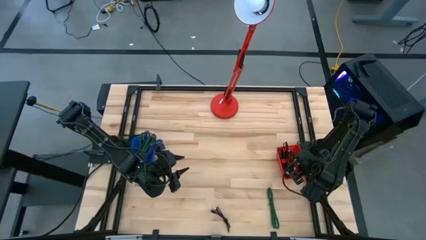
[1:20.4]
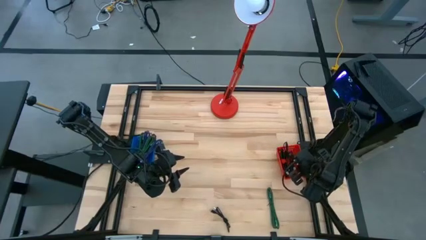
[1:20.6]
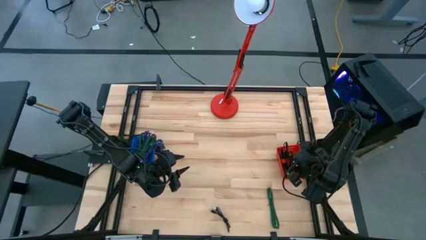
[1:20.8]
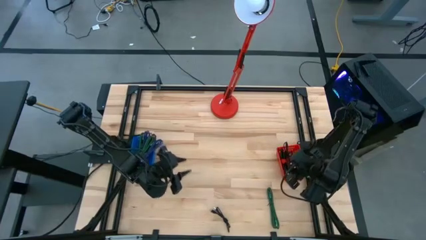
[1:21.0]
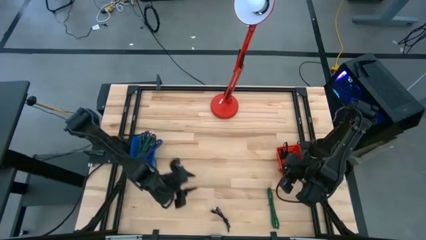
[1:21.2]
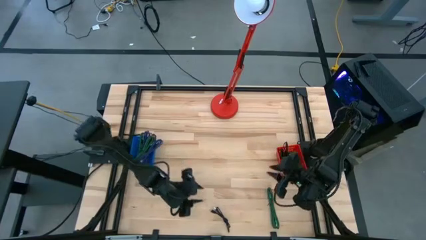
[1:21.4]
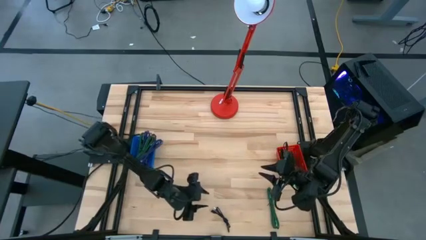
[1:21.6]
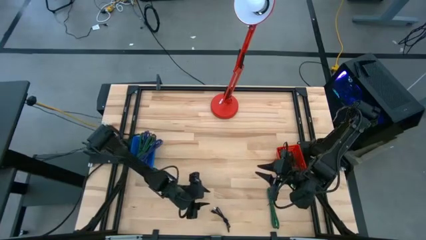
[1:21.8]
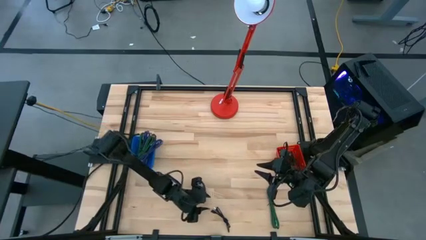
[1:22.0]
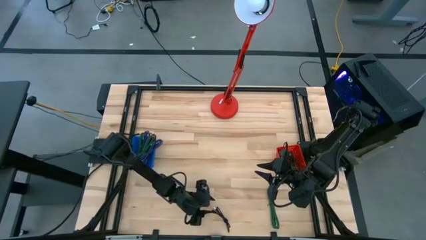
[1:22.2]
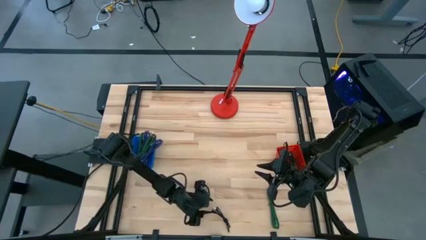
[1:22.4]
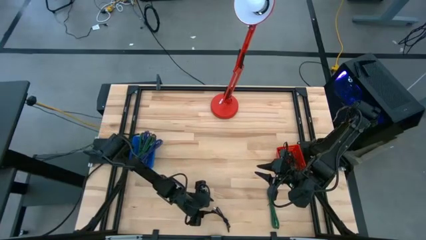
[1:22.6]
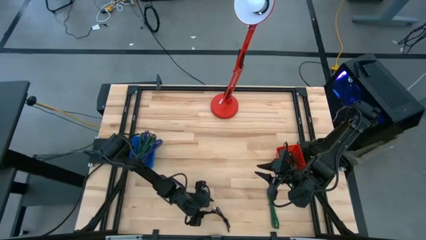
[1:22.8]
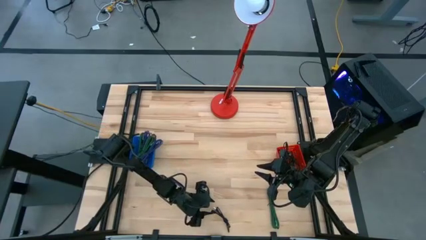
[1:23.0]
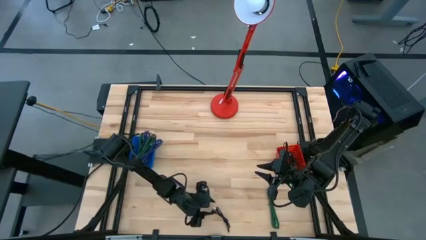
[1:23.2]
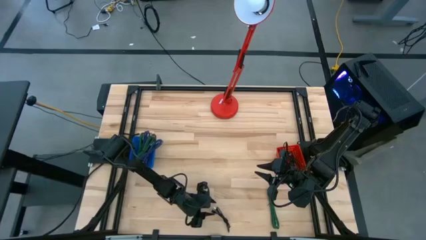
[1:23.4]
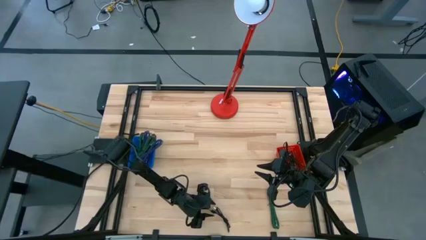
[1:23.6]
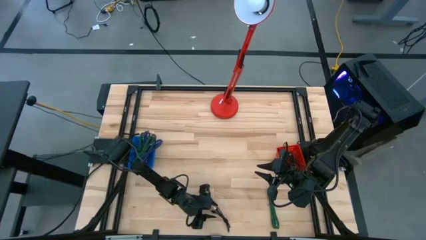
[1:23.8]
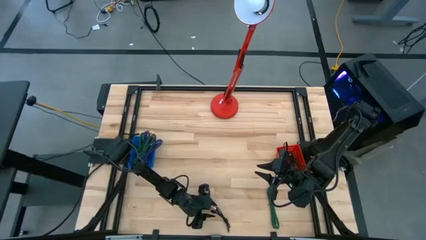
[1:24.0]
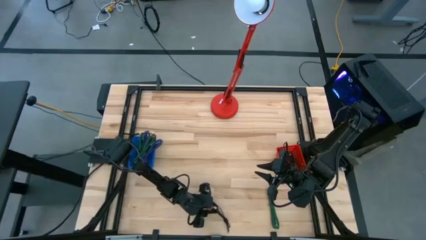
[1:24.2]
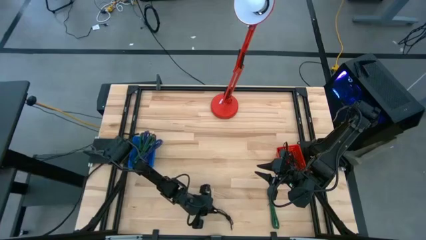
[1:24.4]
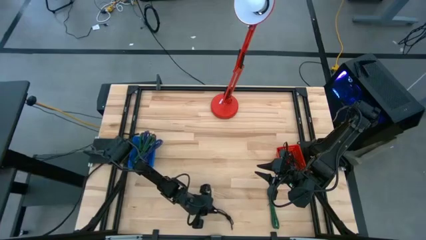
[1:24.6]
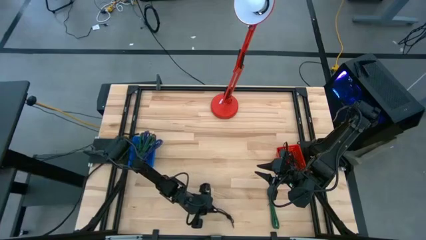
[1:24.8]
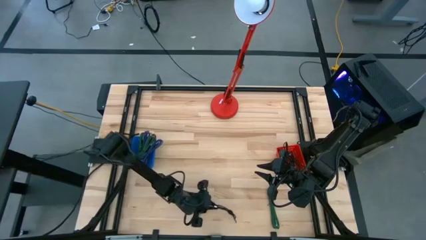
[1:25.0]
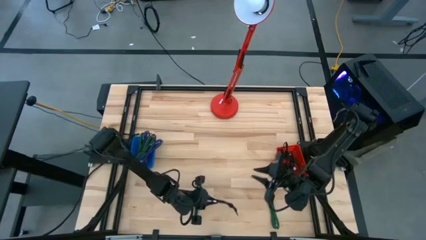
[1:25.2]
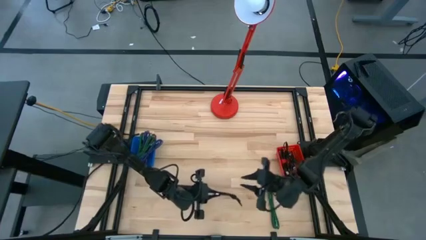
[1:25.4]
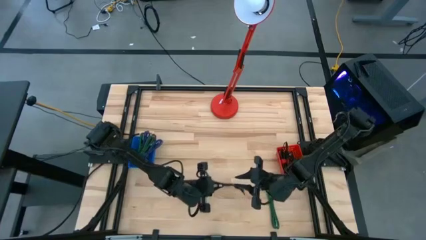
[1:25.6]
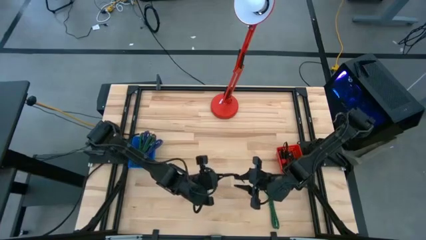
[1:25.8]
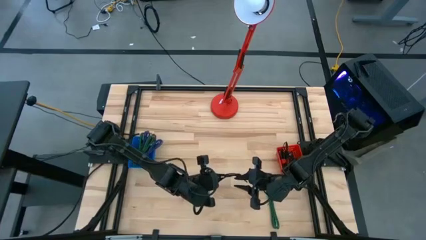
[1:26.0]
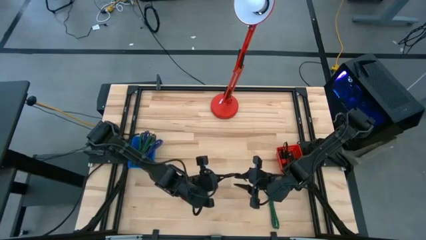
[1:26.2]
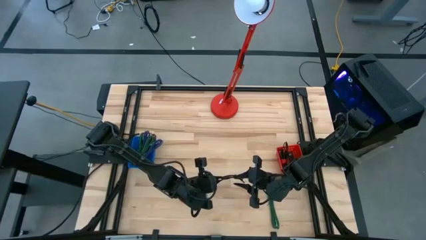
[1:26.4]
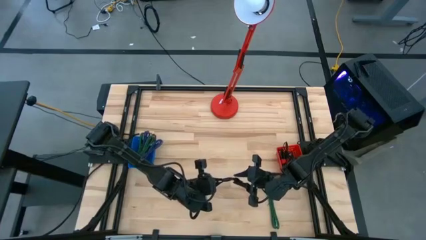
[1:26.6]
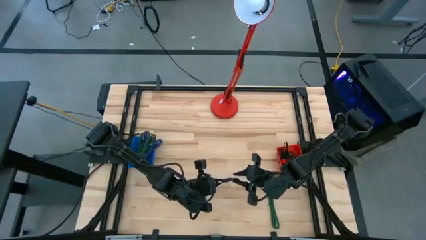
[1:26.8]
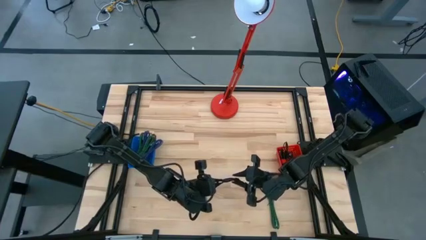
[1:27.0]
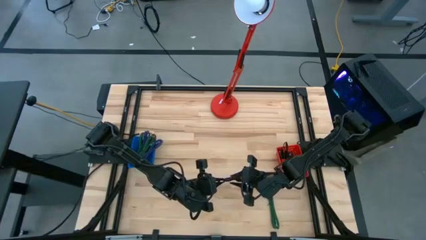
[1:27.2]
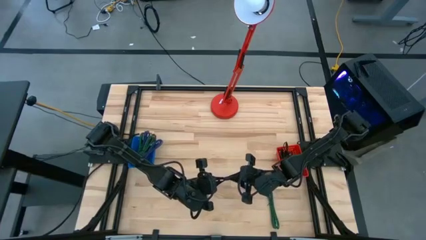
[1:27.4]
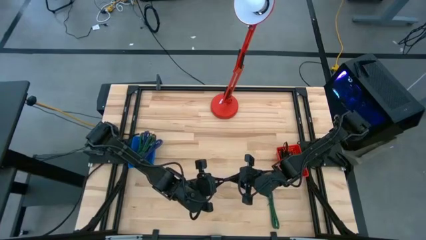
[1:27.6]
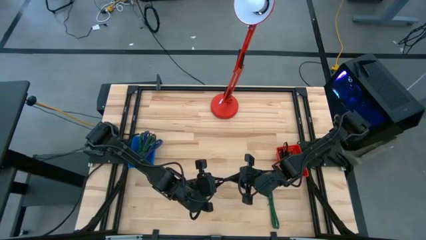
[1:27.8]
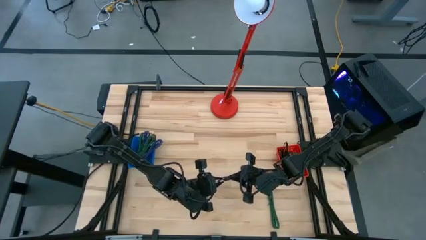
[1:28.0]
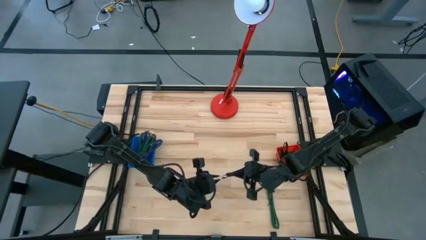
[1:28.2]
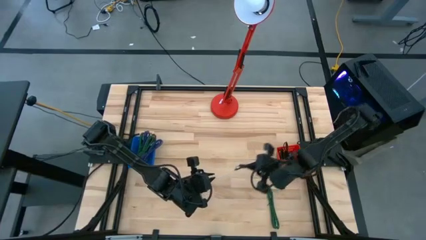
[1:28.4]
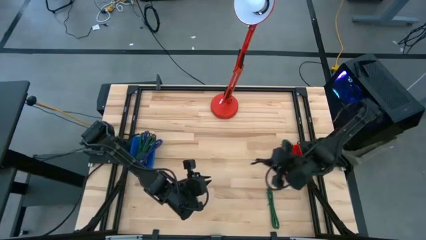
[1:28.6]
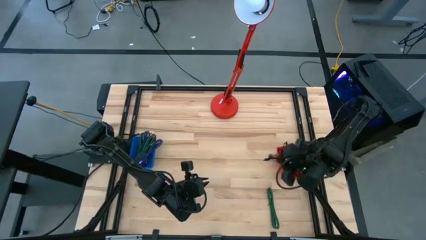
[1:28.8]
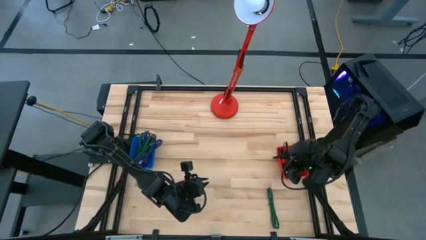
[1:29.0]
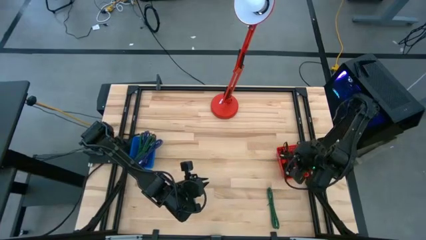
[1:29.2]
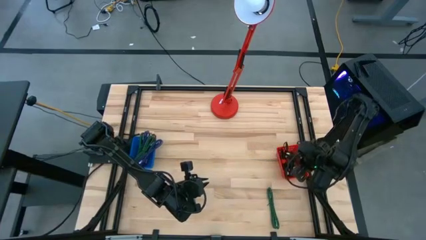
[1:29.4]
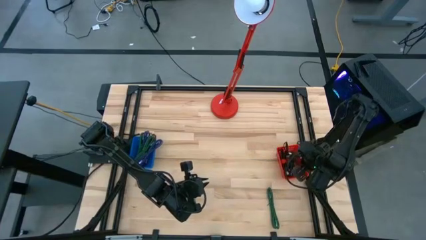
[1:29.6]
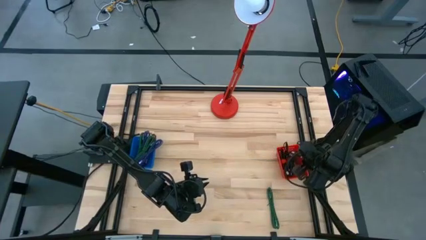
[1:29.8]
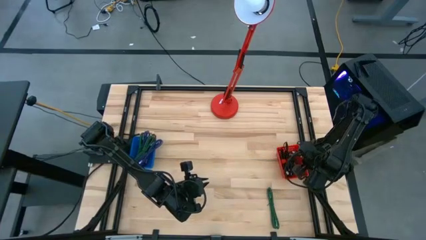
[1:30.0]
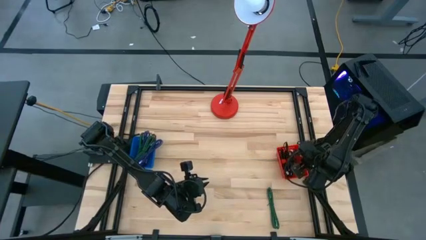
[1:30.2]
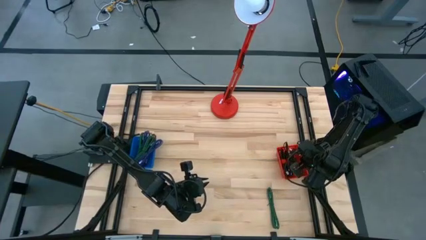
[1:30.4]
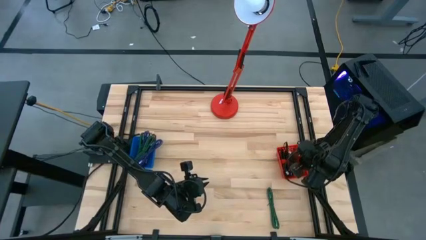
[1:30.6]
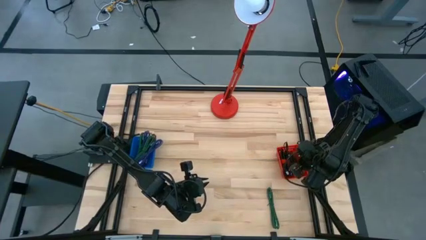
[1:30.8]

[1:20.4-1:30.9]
Task: Pick & Place USB Port
Put the black charger cable into the red bin
